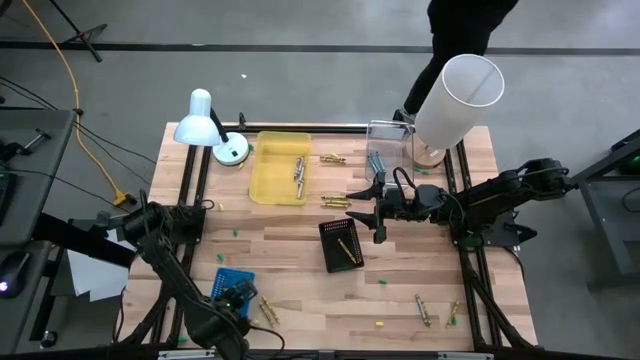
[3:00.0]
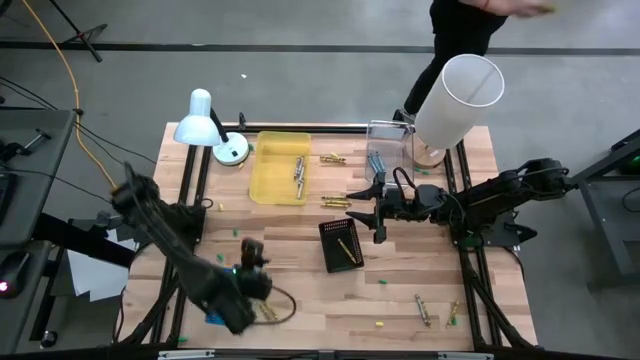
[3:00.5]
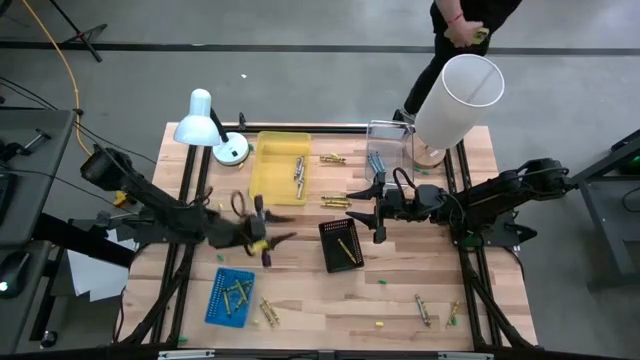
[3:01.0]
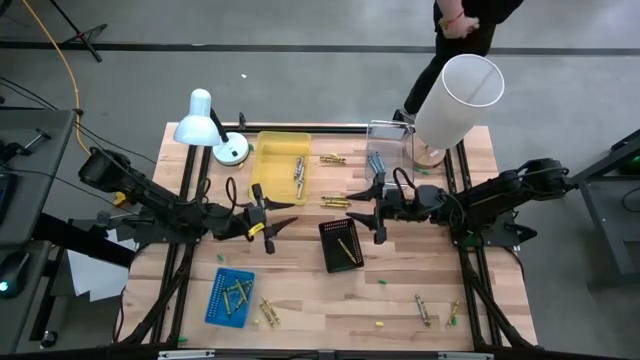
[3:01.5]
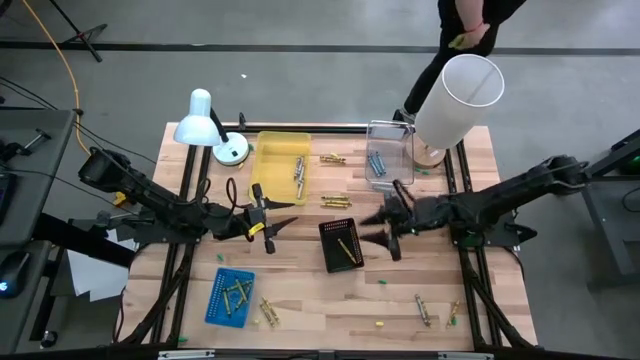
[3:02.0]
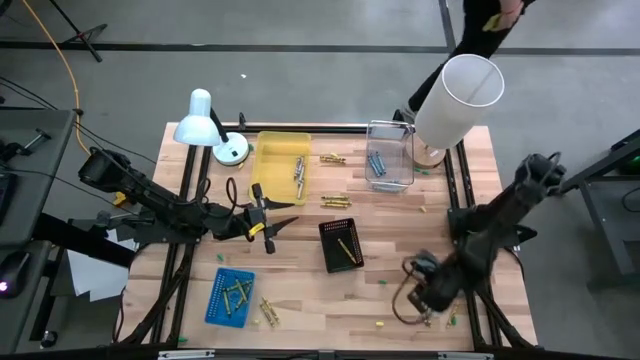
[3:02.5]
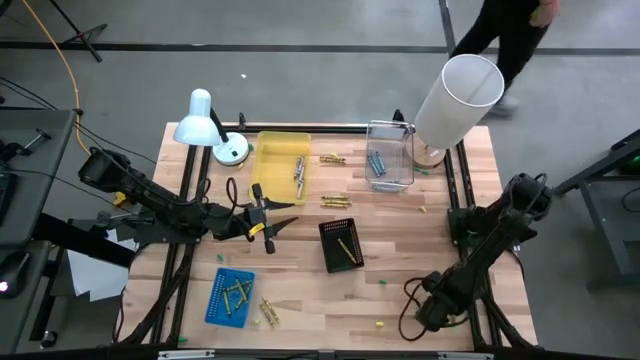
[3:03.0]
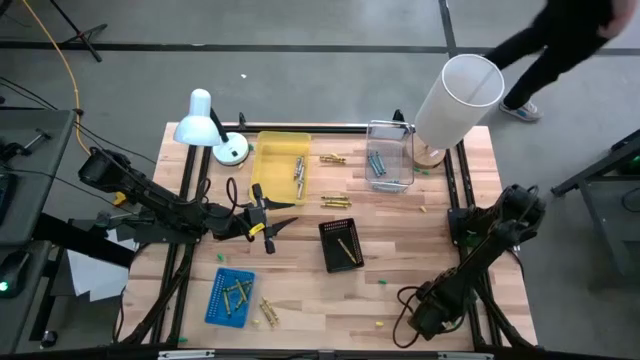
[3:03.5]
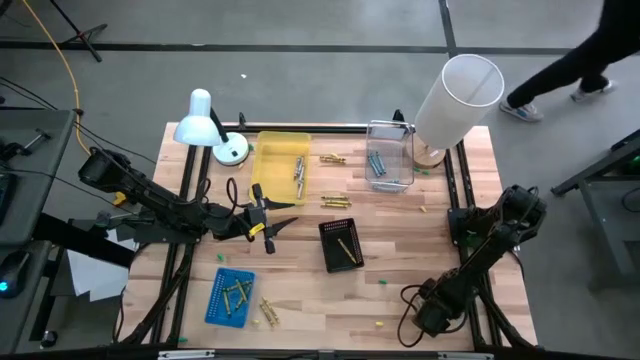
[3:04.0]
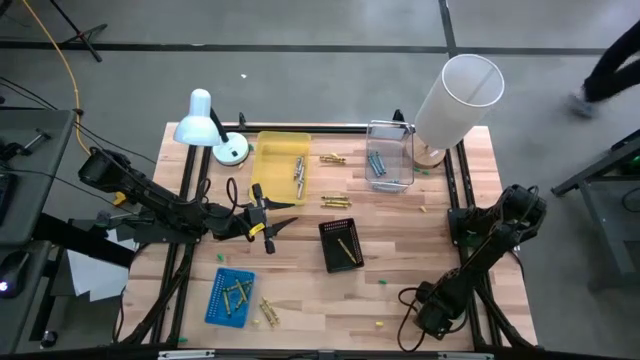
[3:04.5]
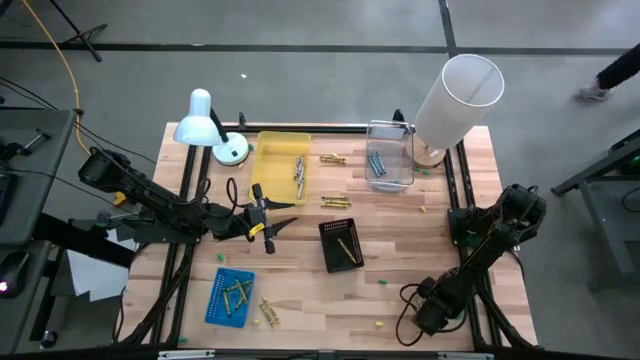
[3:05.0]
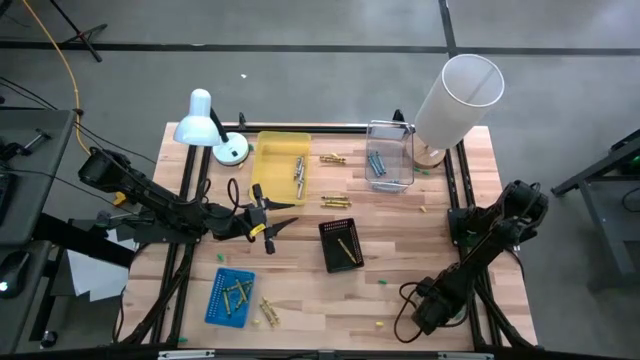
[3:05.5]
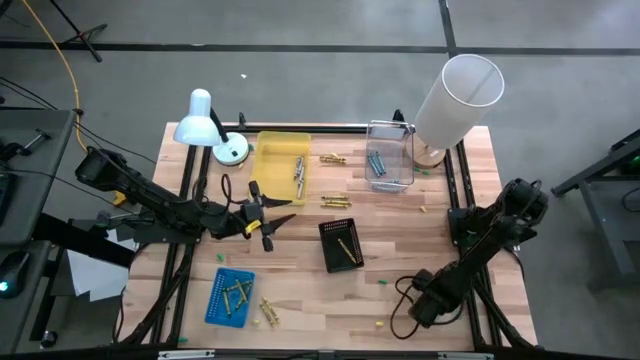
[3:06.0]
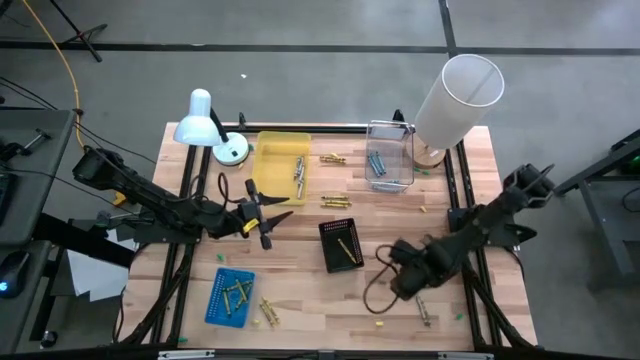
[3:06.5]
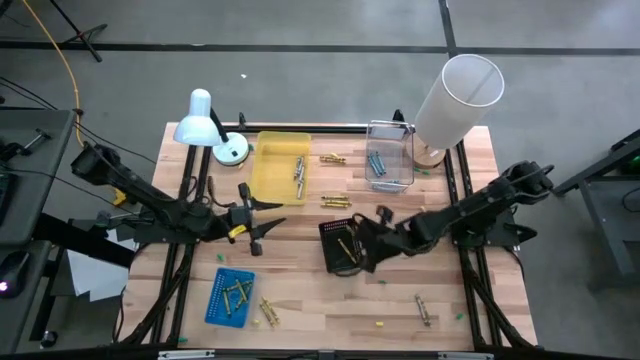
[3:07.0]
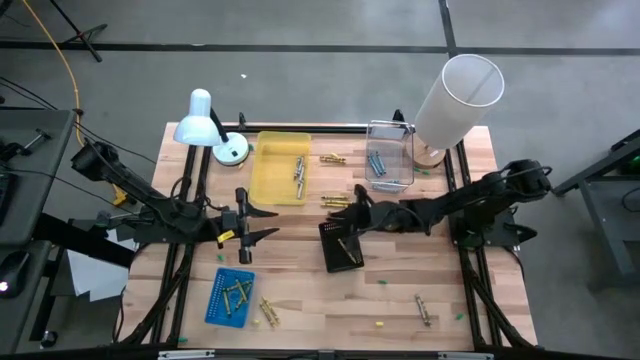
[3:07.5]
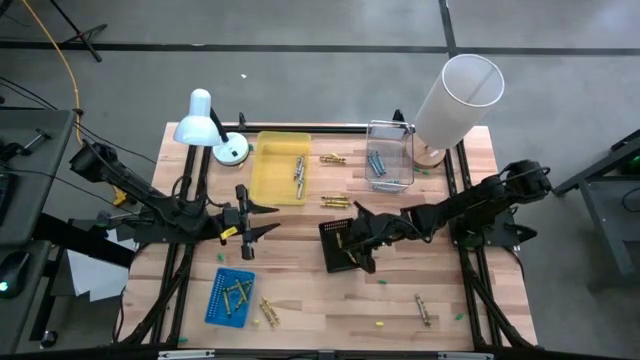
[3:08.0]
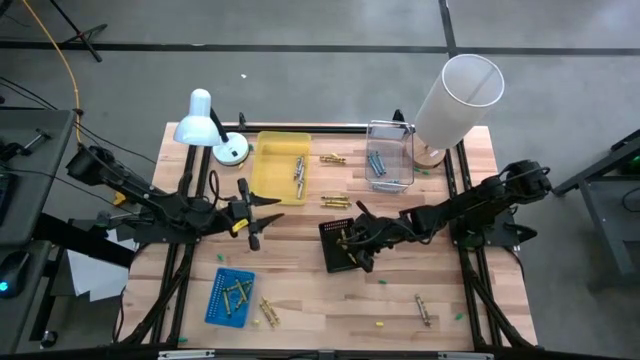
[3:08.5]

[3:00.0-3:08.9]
Task: Sort crayons
Put the yellow crayon into the black bin

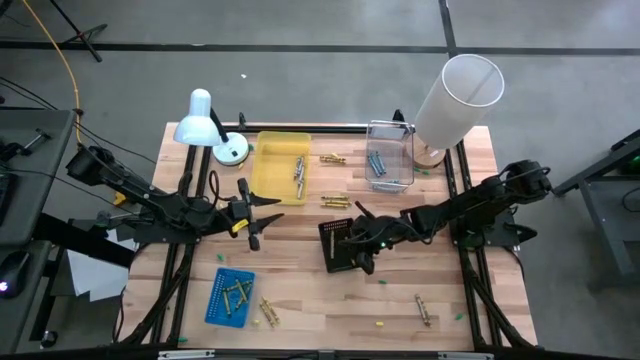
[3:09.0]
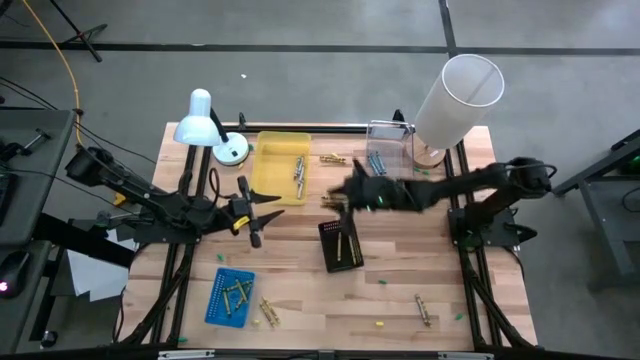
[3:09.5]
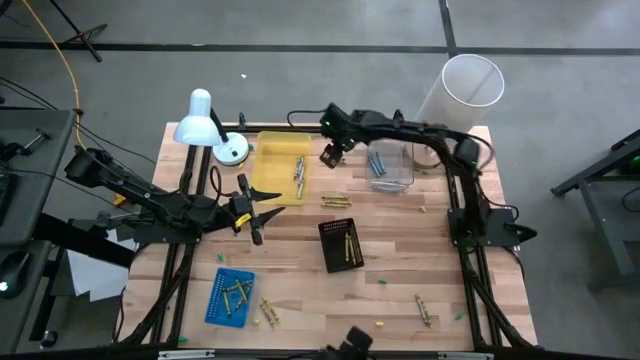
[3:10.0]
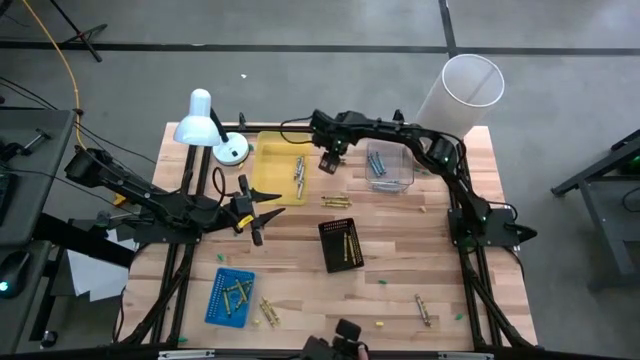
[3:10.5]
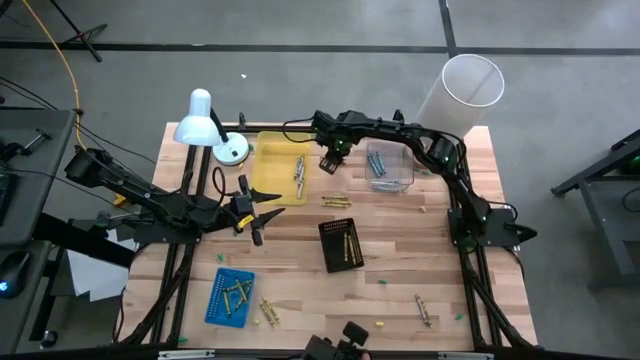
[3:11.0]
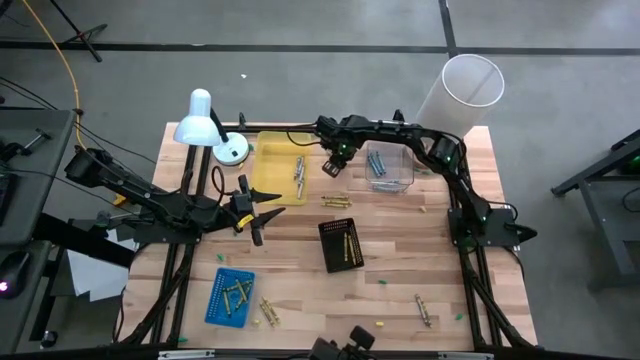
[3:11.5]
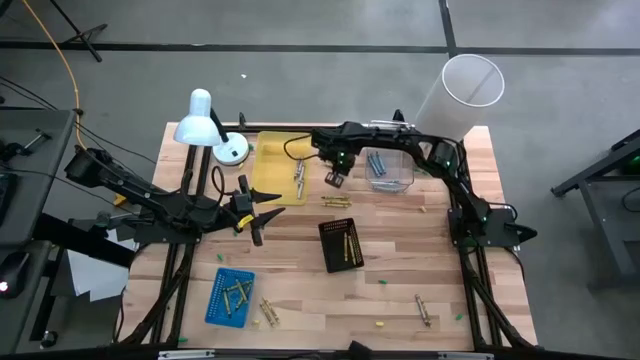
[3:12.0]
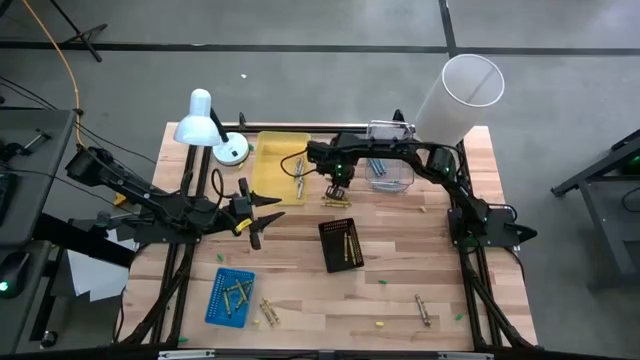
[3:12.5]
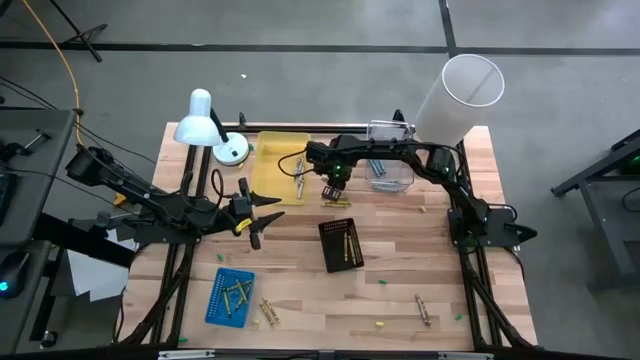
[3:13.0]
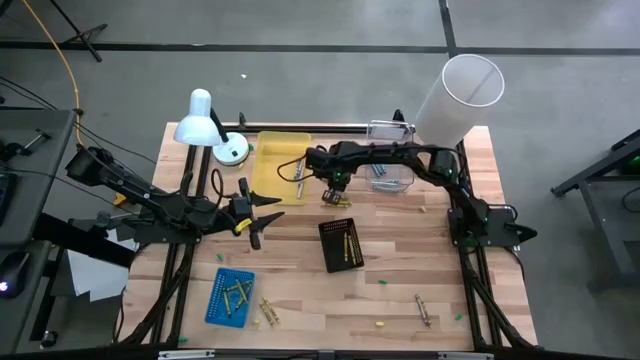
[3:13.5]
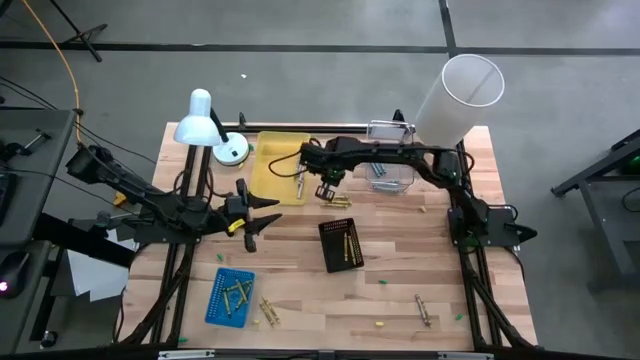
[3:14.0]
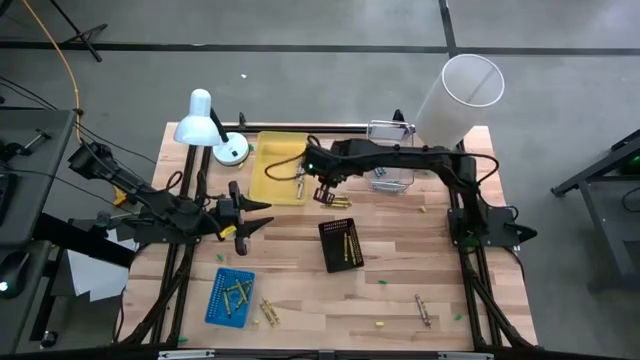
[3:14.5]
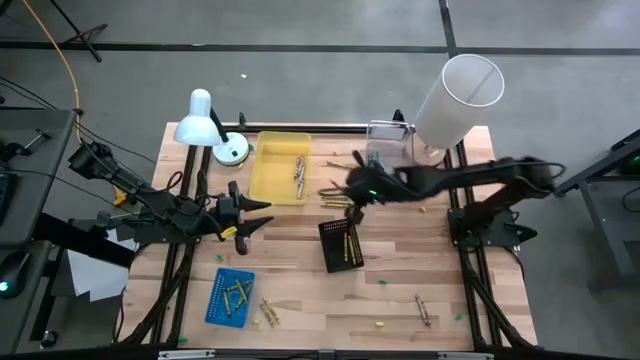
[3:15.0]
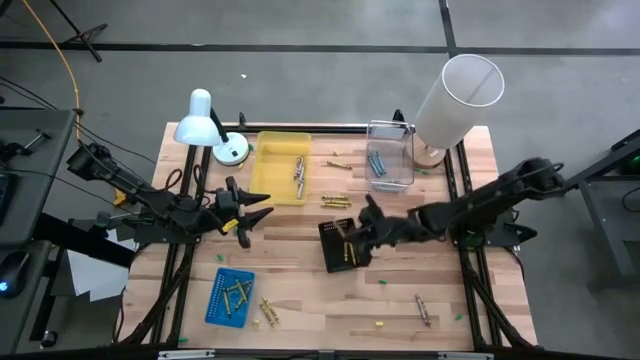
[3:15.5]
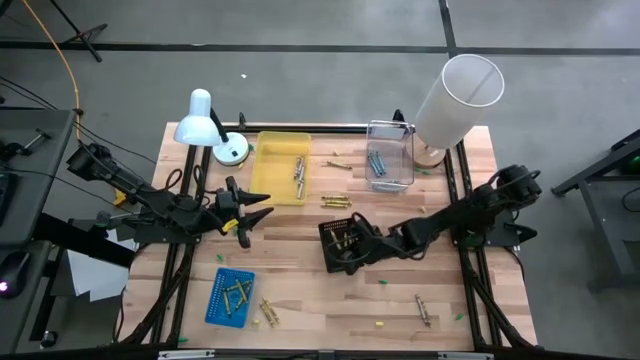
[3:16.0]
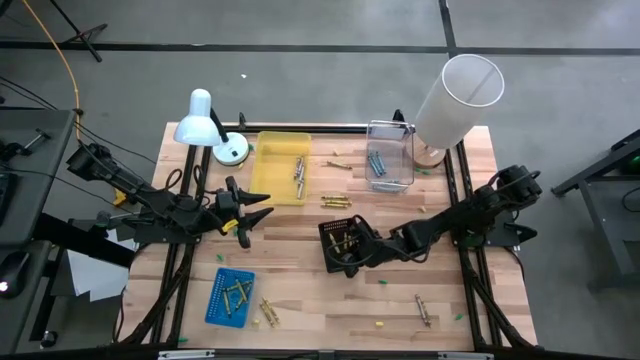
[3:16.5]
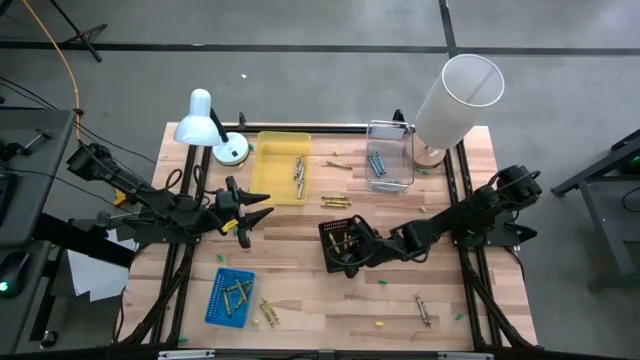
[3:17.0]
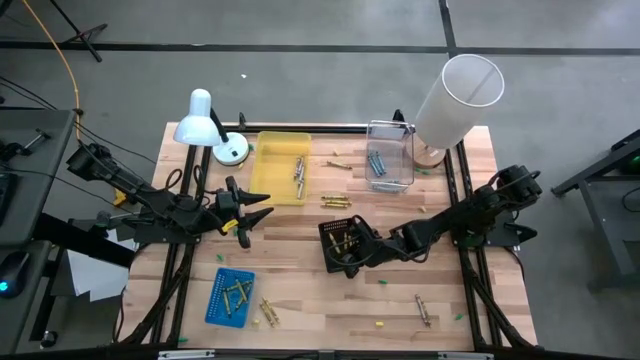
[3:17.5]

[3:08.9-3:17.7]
Put the yellow crayon into the black bin

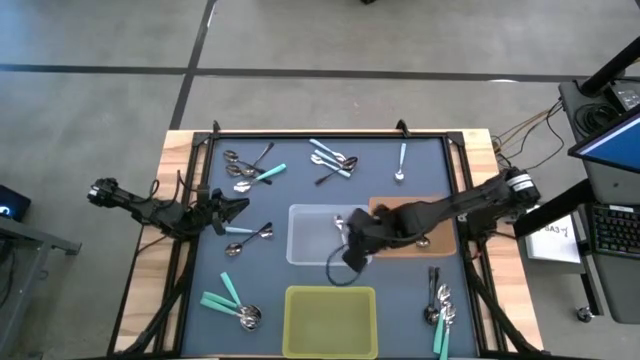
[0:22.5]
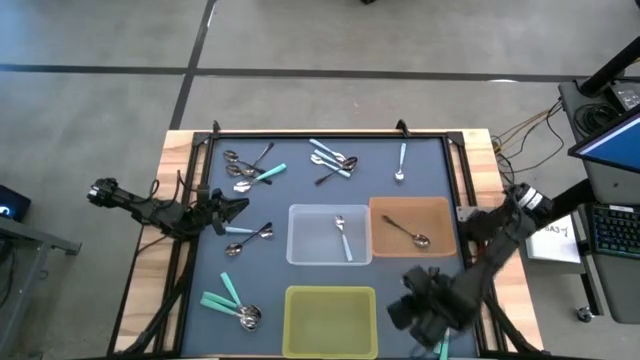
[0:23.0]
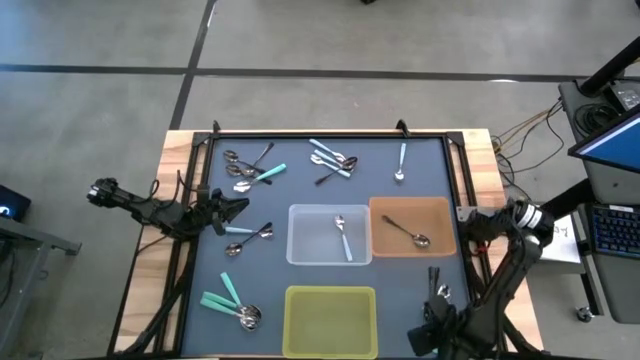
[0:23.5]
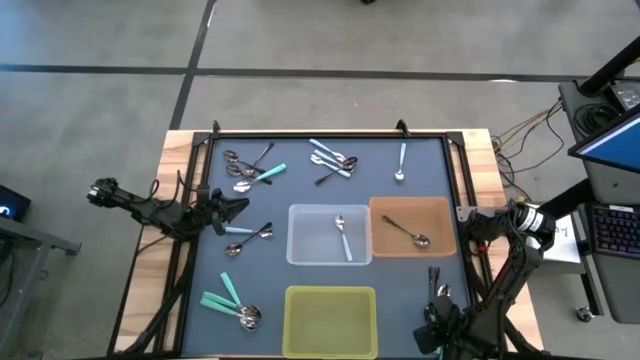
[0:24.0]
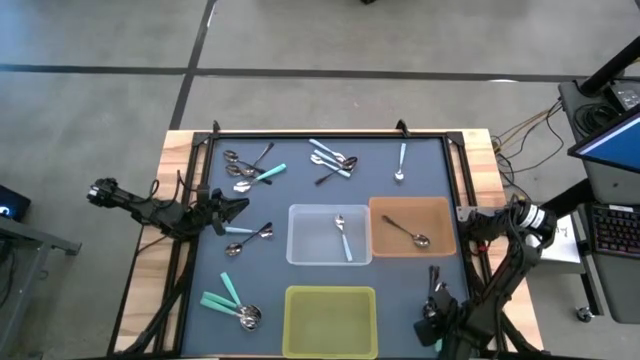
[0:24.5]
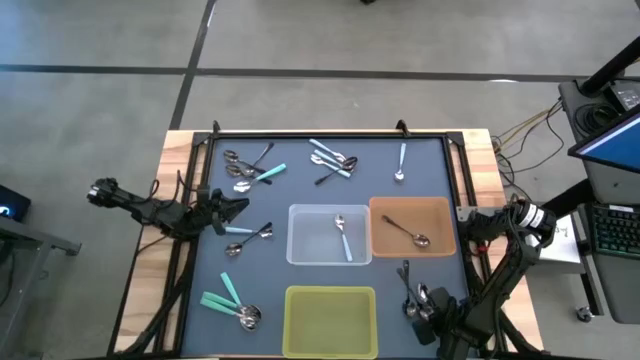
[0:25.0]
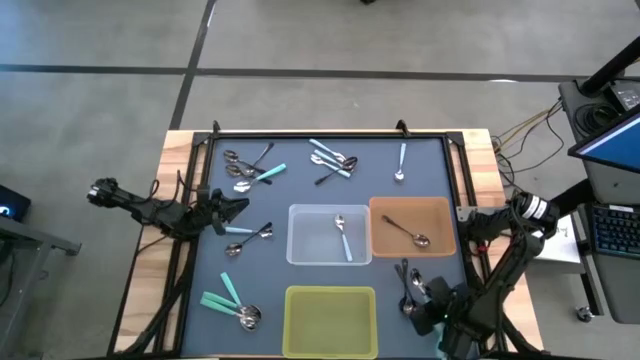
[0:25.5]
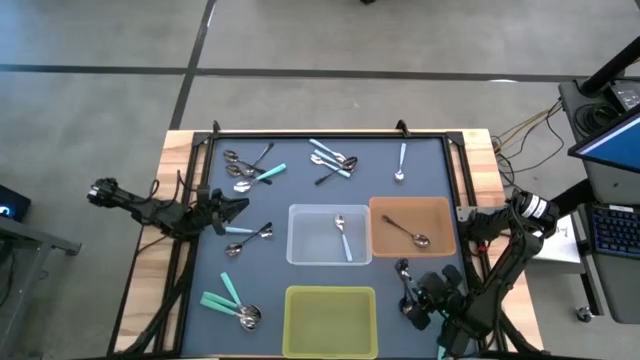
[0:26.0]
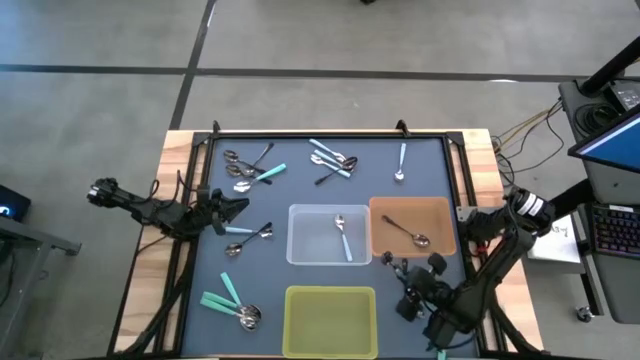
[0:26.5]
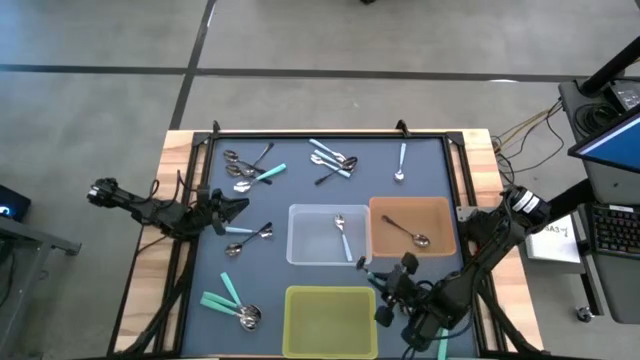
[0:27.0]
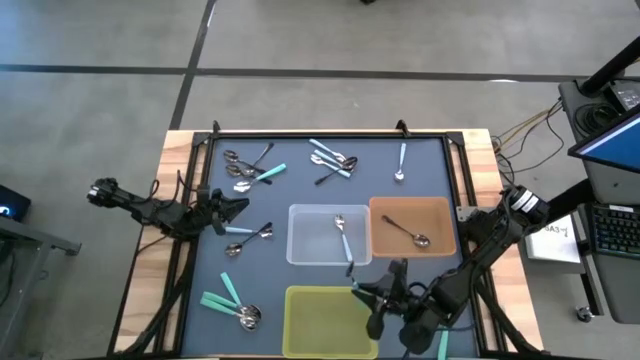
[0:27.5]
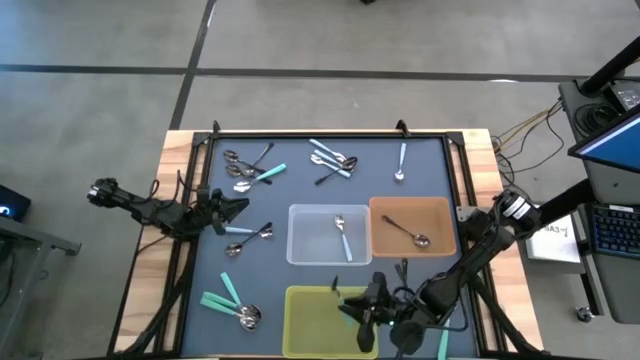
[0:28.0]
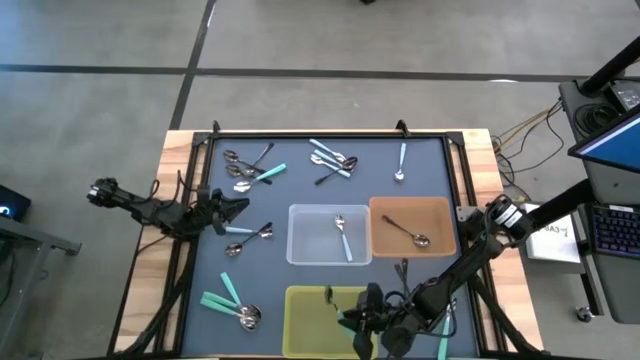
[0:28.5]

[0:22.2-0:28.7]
Task: Sort silverware by color (type)
Put the light green spoon into the yellow bin
